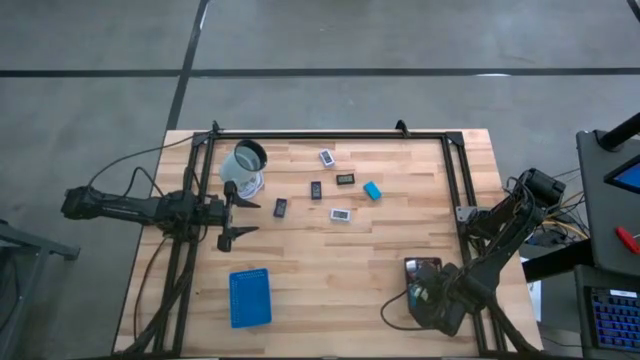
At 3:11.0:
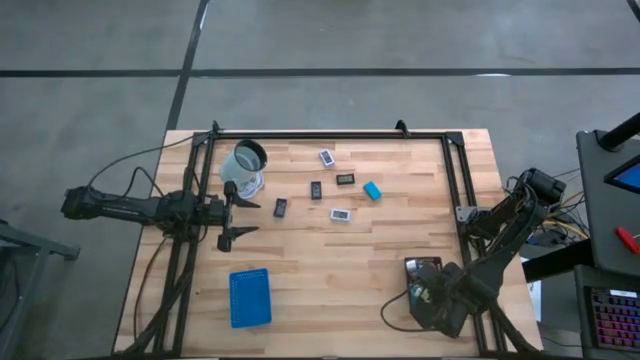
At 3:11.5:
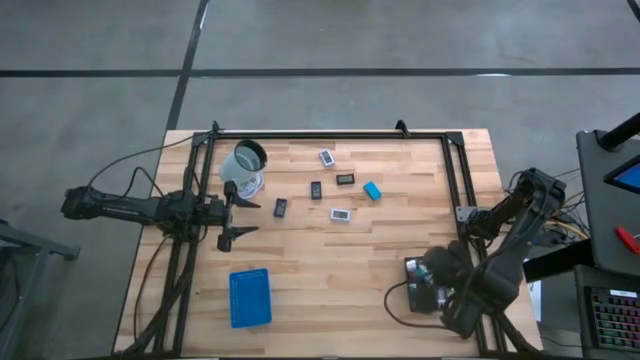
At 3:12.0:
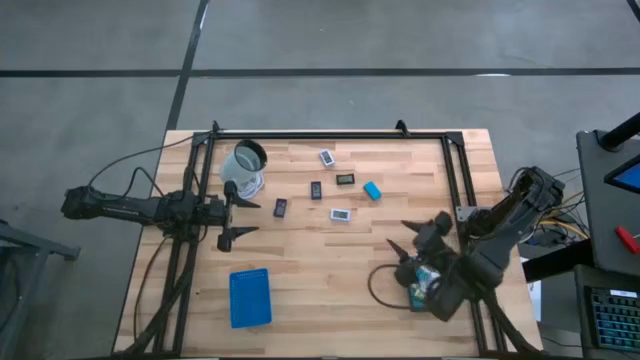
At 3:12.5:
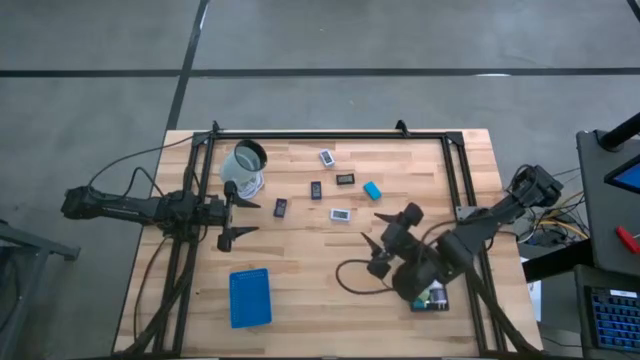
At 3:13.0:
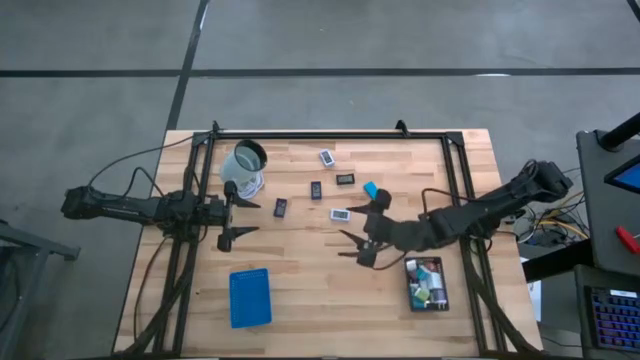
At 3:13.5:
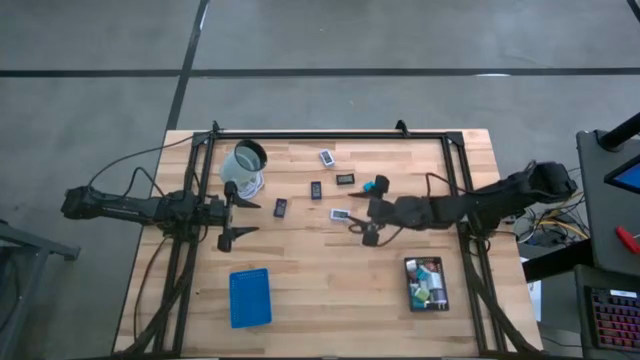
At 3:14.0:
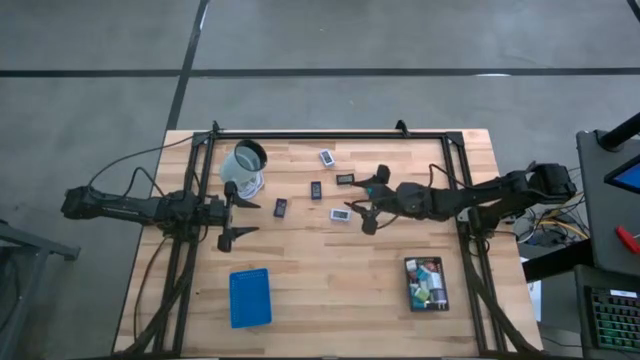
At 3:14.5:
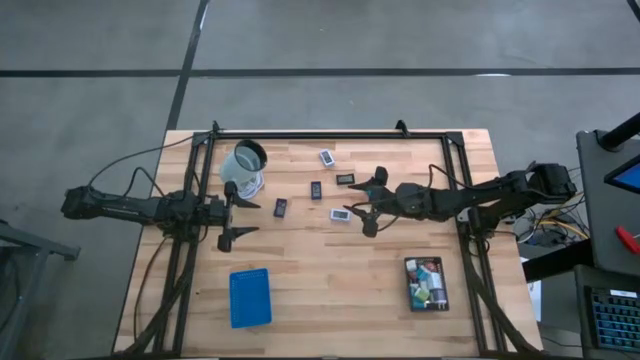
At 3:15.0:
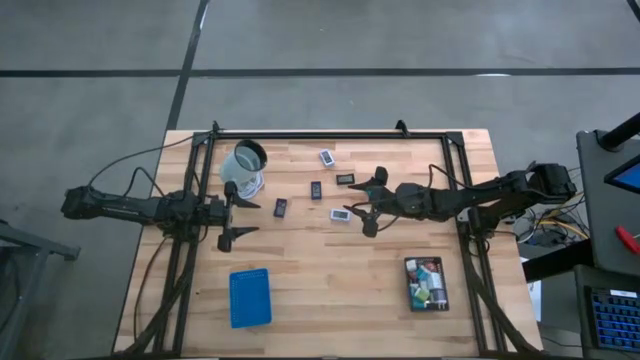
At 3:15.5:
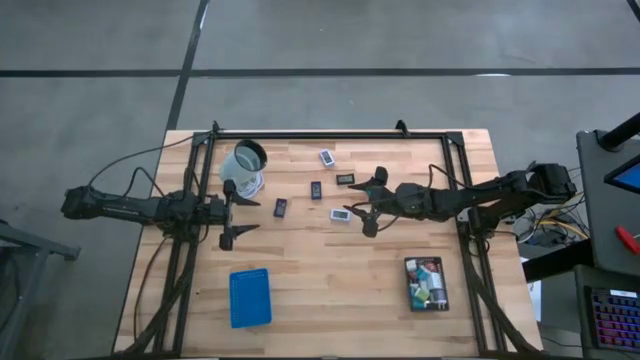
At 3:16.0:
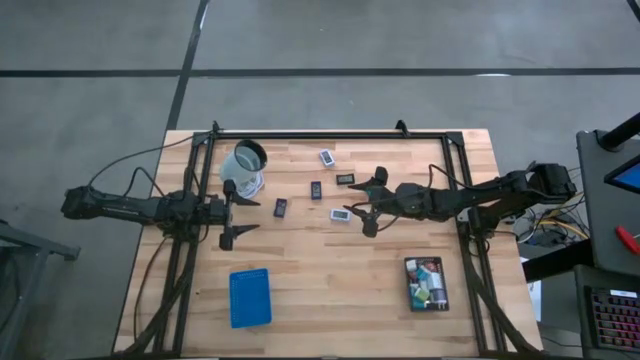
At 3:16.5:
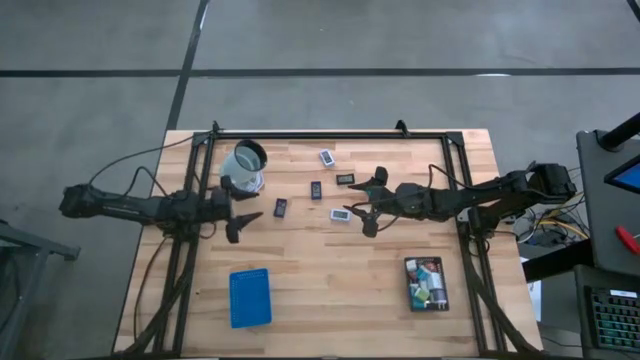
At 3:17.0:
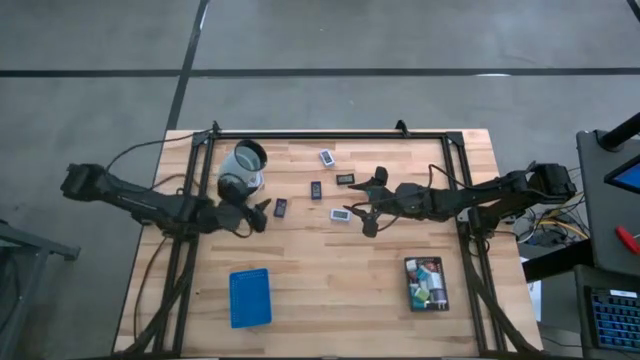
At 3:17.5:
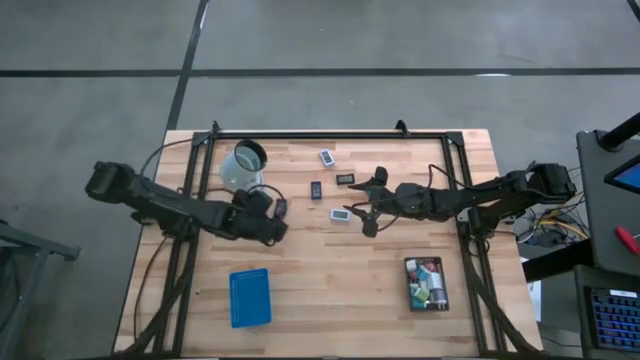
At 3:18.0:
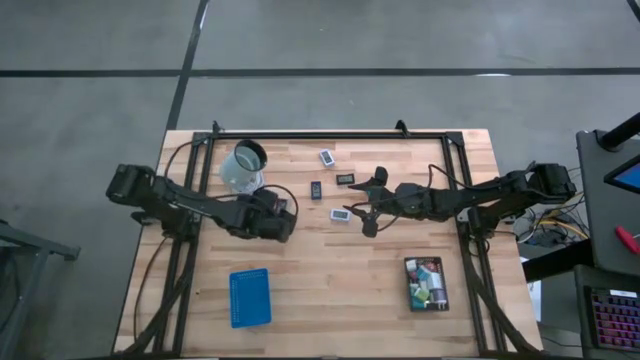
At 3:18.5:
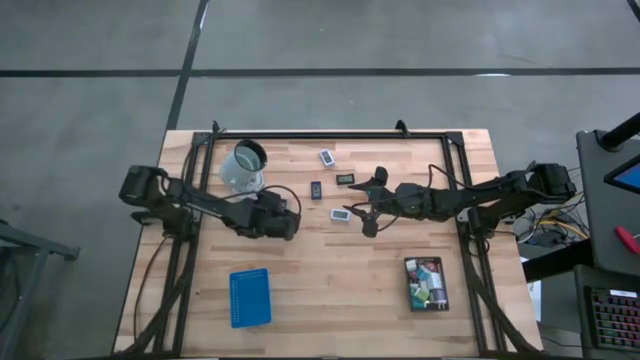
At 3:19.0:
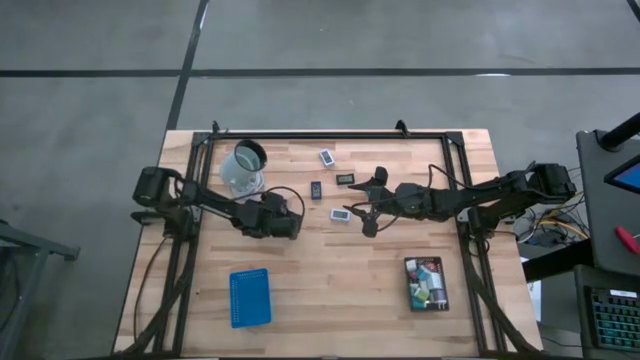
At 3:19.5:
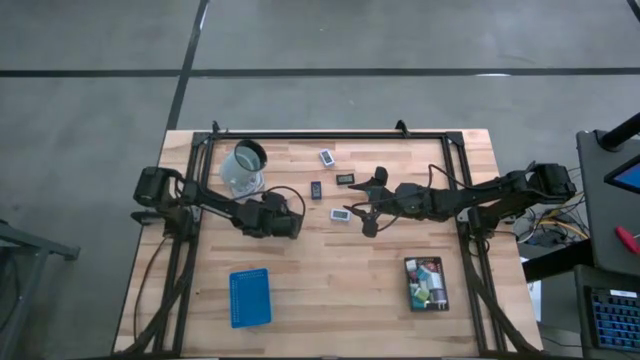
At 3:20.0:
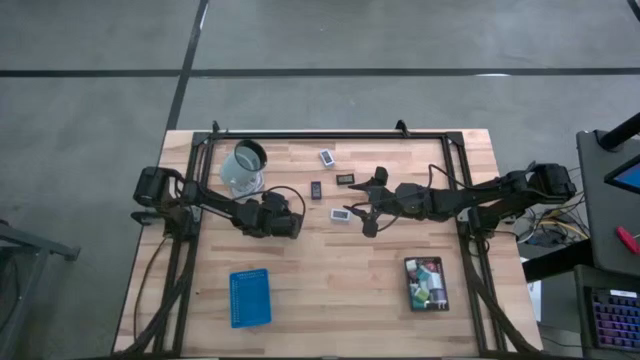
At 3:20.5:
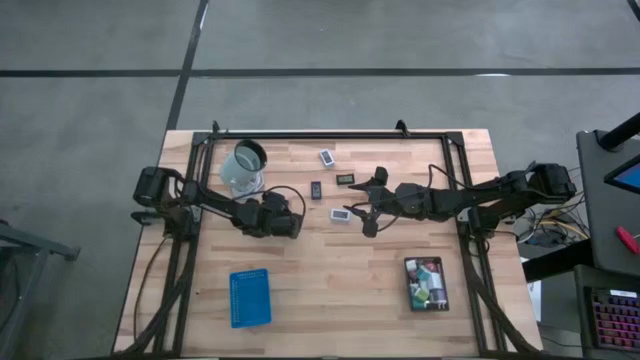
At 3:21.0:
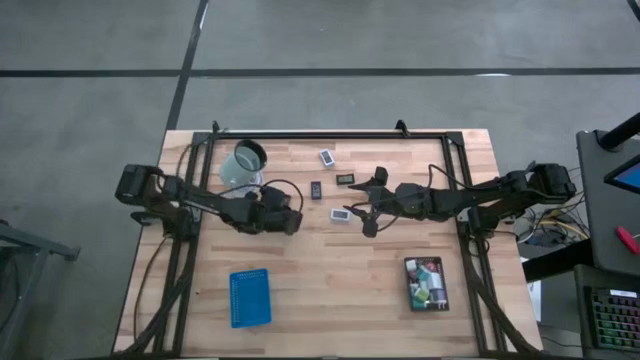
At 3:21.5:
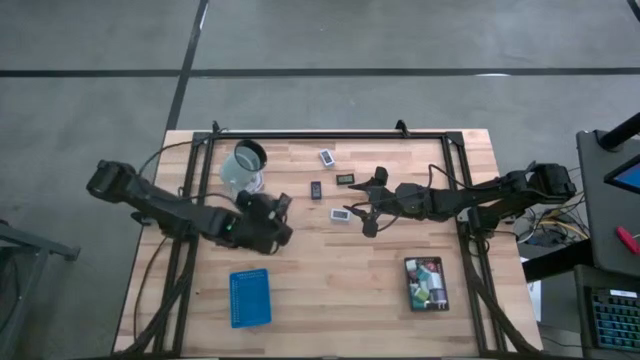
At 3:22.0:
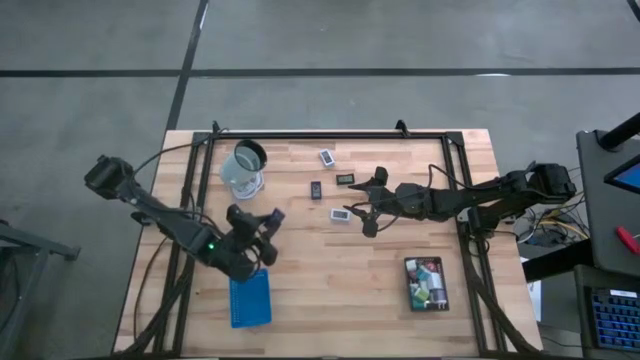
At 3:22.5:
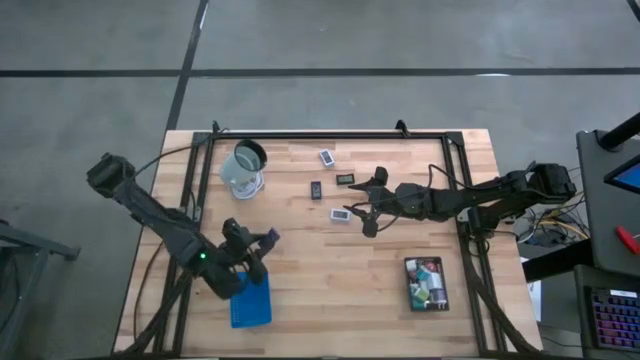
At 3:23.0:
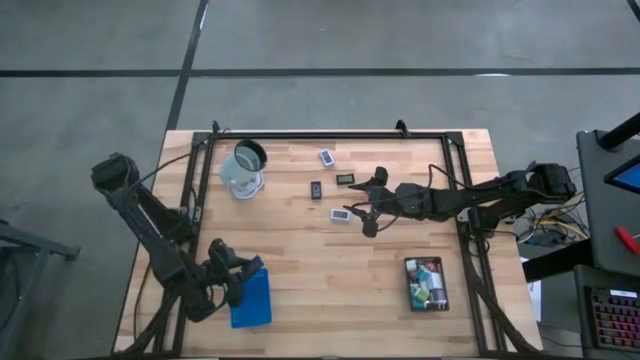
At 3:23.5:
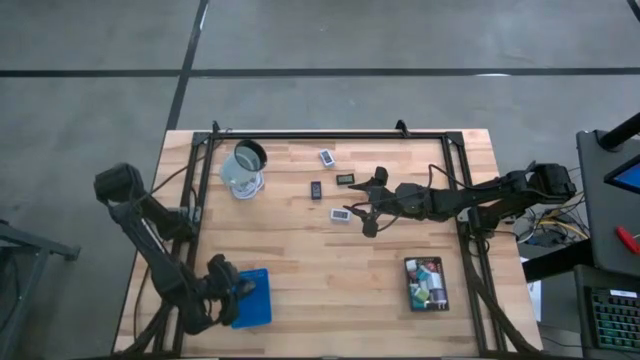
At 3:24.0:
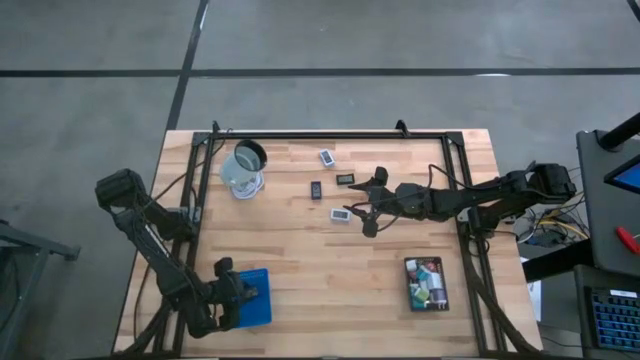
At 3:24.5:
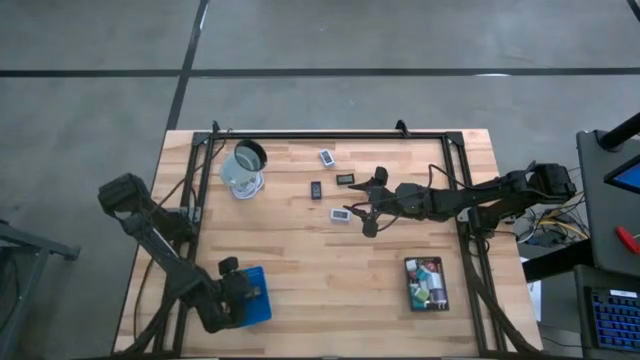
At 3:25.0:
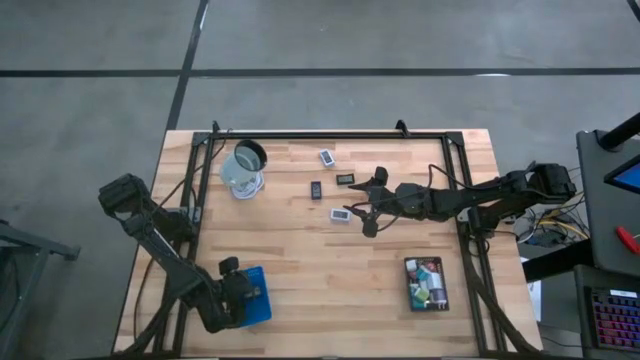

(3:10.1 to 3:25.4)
Task: Pick & Place Office items
Put the bottom blue digital clock into the blue bin

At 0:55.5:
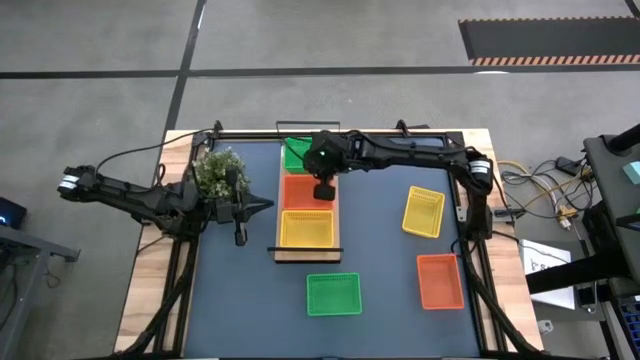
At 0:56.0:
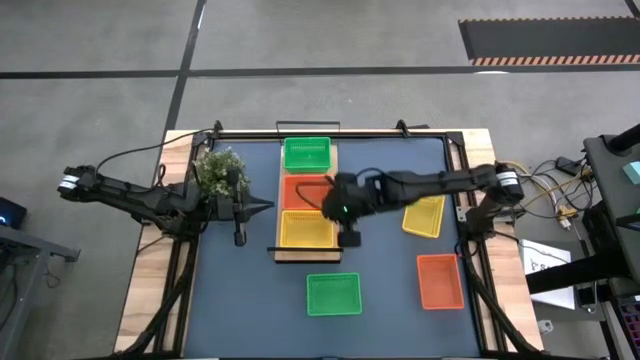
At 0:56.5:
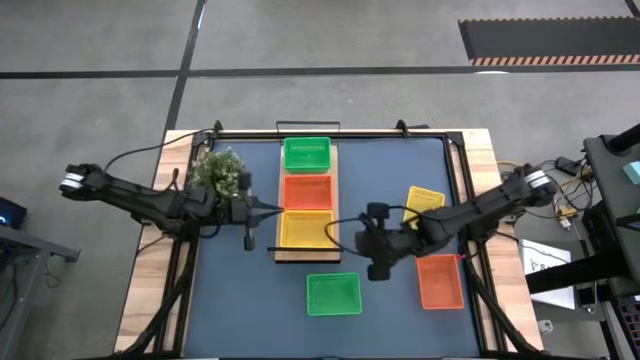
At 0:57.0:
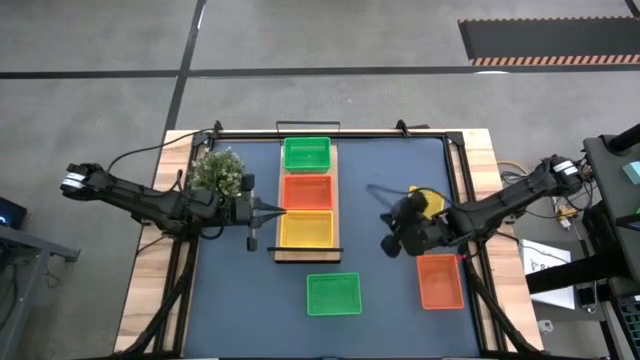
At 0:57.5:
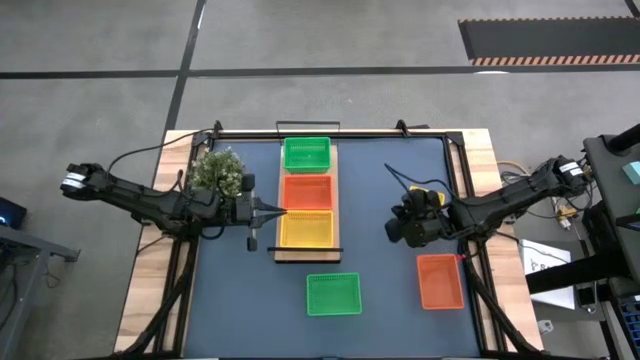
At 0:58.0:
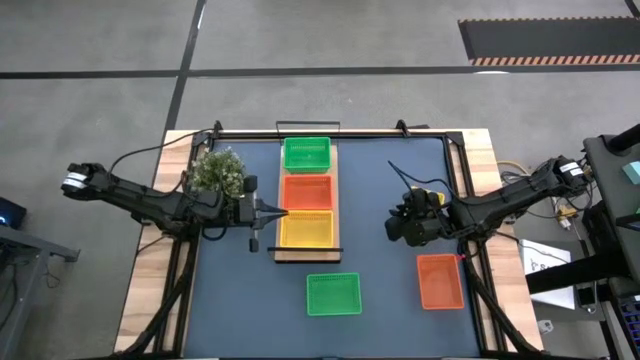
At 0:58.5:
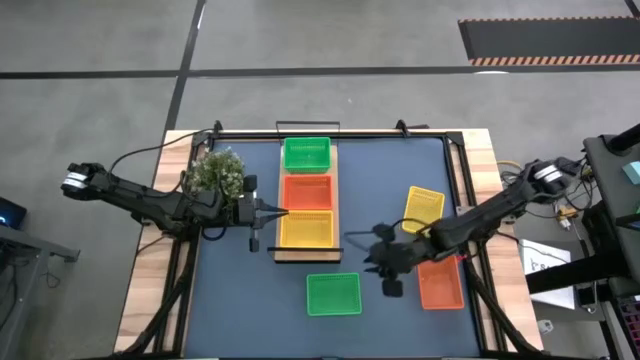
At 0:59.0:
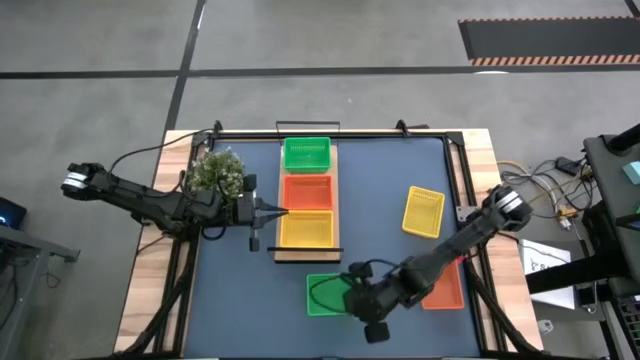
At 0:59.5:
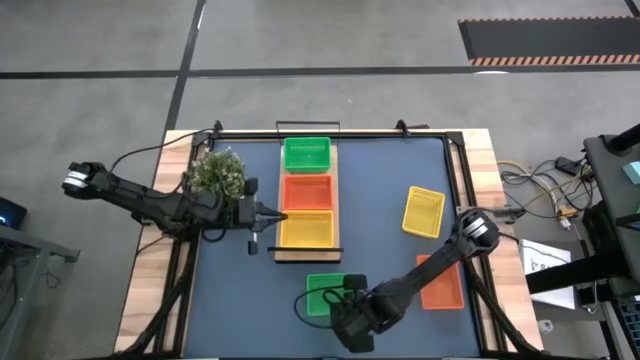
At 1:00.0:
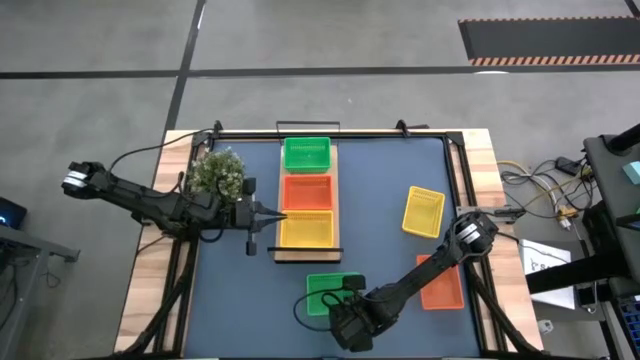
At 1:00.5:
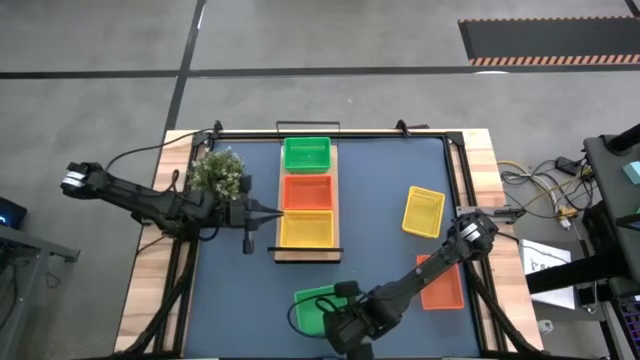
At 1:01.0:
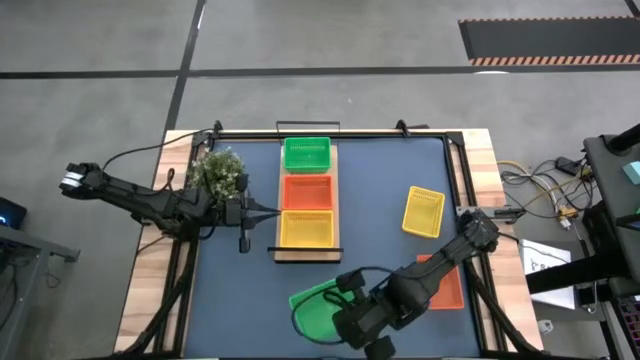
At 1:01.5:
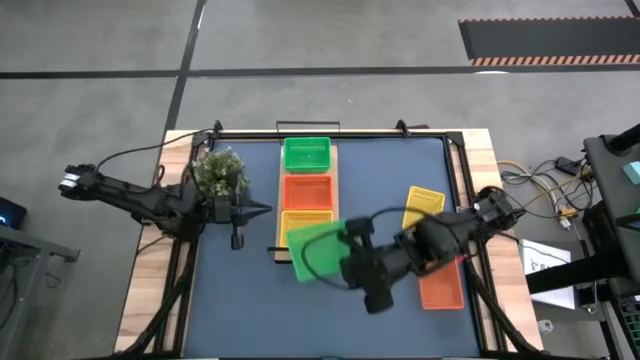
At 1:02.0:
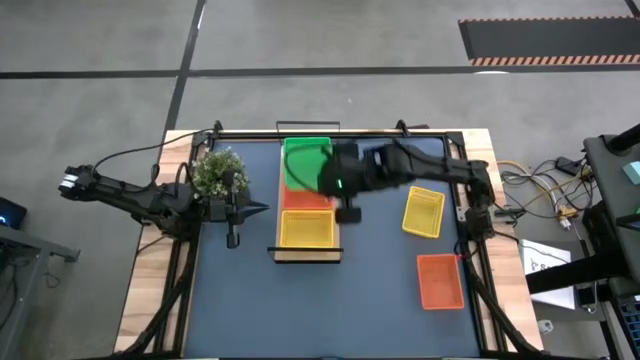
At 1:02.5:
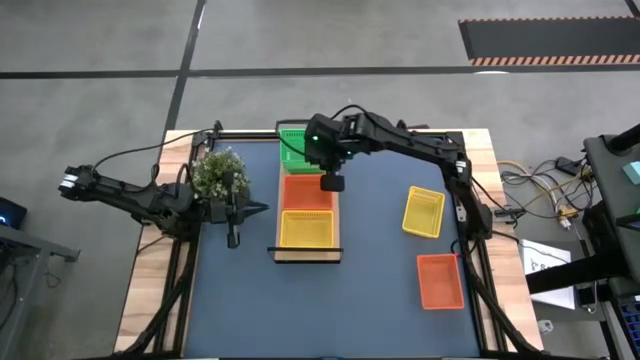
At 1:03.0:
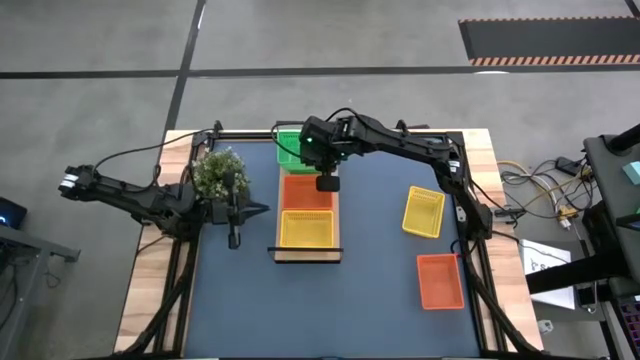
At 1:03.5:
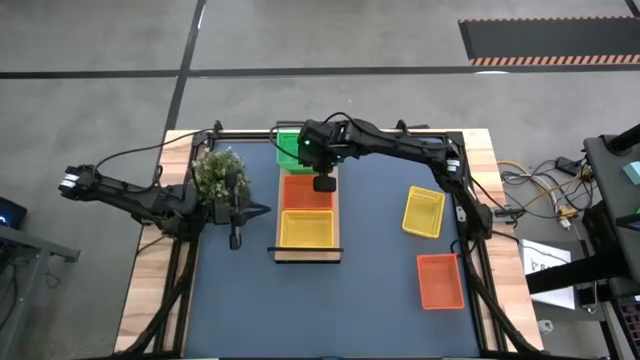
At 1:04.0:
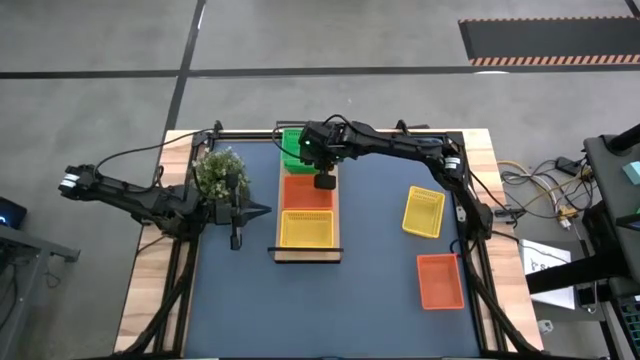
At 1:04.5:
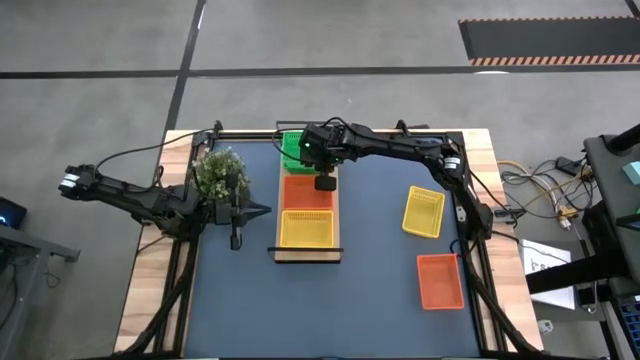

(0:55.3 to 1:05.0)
Task: Stack baskets on shelf by color
Stack the green bin on the green bin on the shelf
